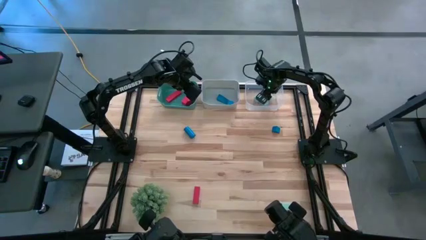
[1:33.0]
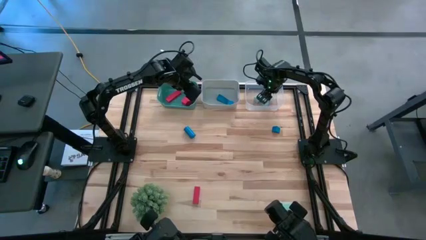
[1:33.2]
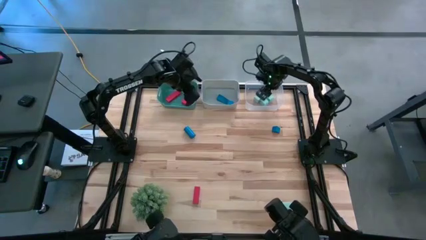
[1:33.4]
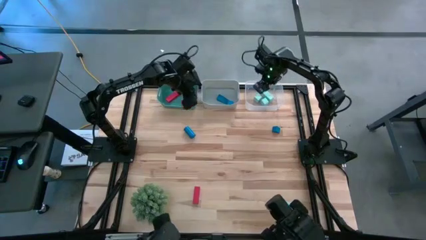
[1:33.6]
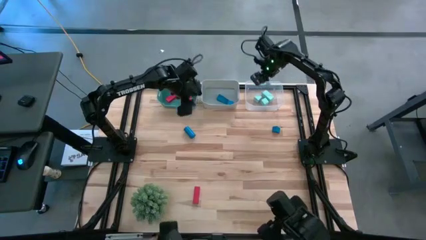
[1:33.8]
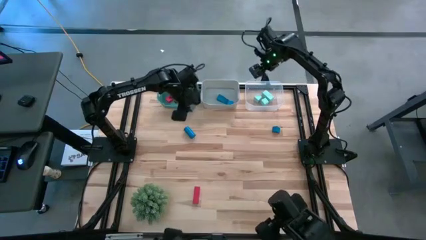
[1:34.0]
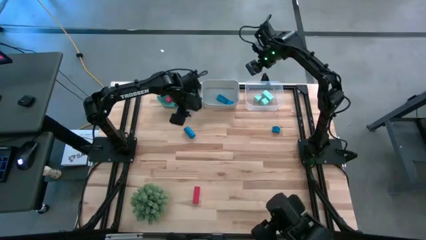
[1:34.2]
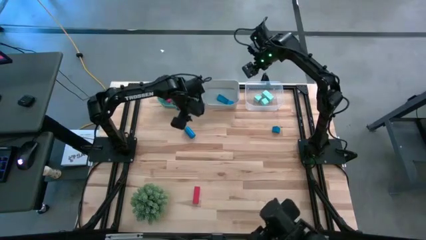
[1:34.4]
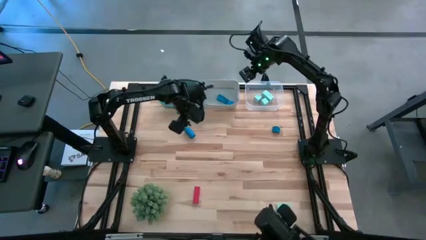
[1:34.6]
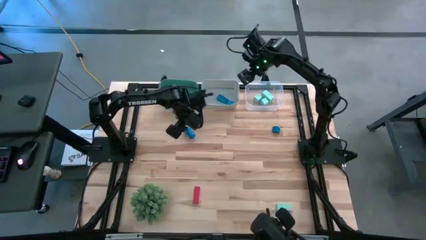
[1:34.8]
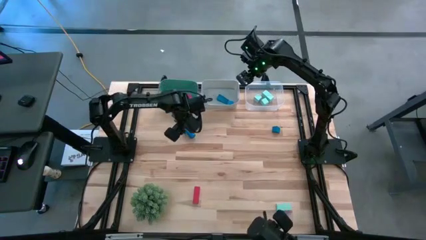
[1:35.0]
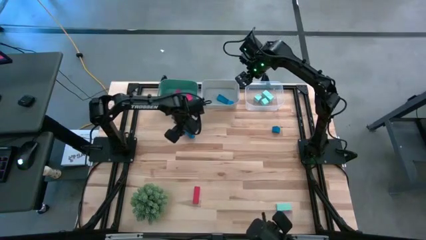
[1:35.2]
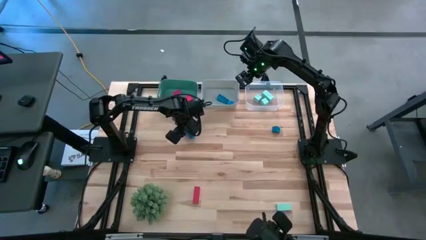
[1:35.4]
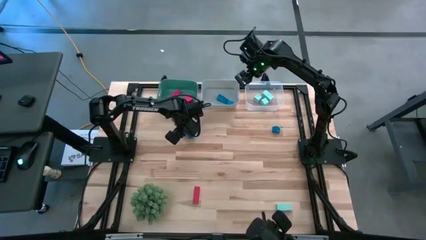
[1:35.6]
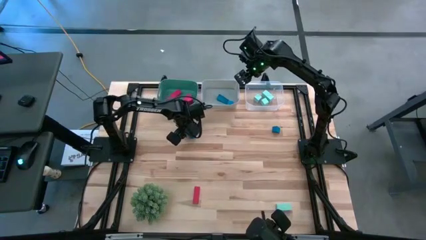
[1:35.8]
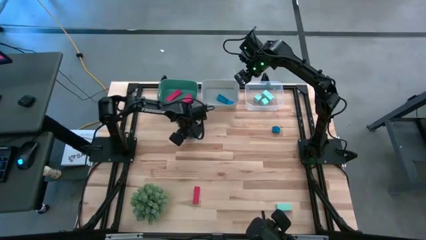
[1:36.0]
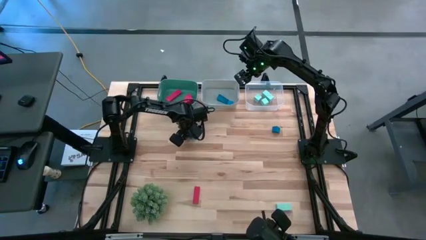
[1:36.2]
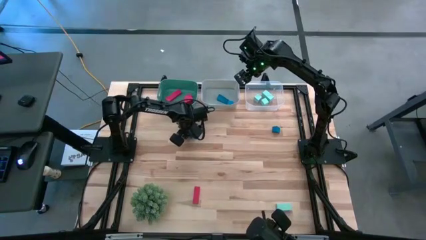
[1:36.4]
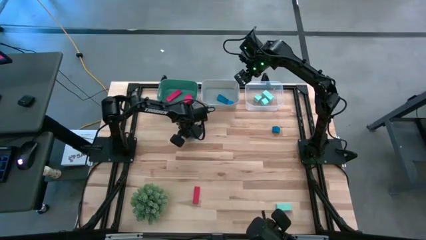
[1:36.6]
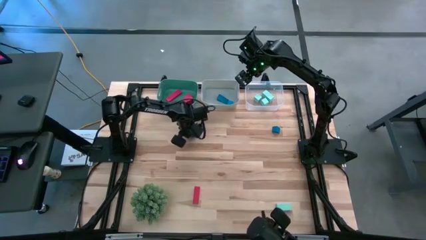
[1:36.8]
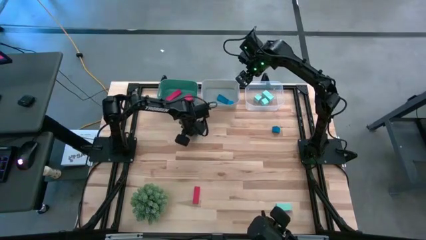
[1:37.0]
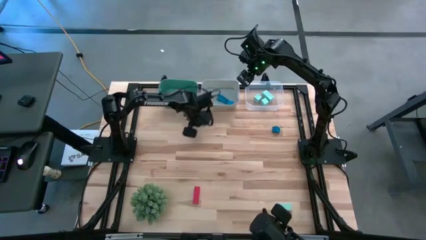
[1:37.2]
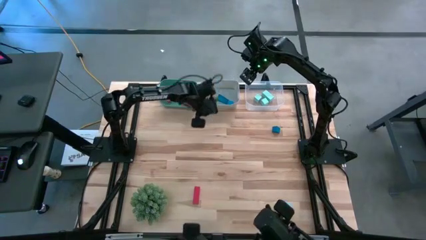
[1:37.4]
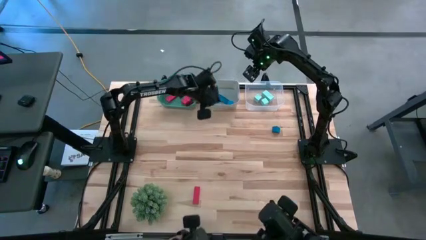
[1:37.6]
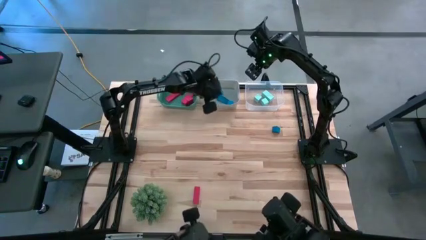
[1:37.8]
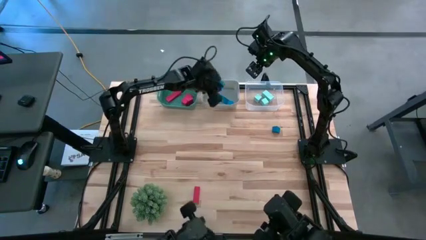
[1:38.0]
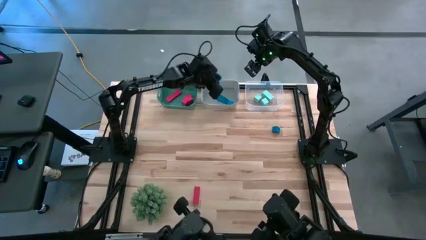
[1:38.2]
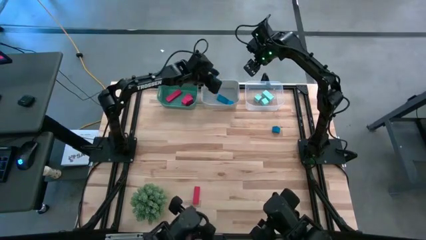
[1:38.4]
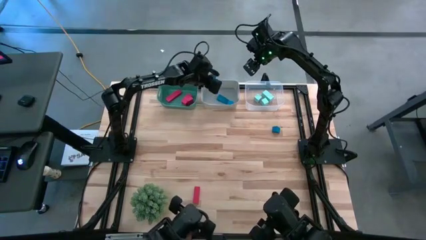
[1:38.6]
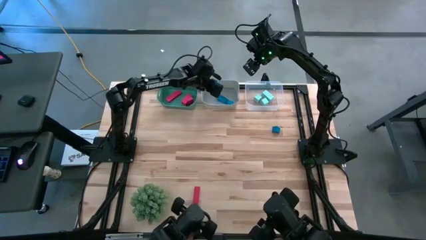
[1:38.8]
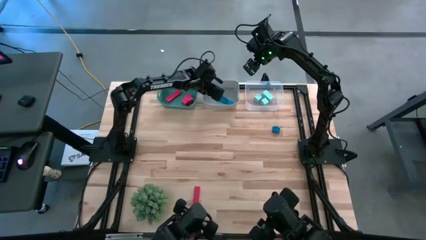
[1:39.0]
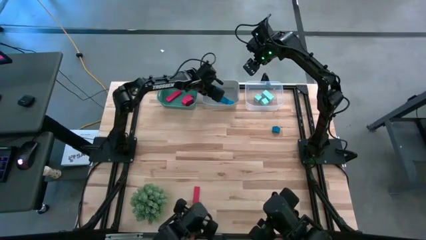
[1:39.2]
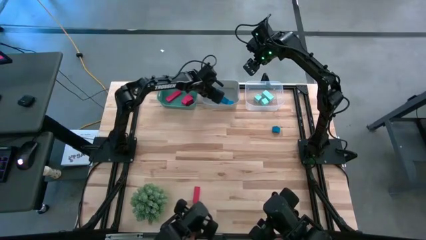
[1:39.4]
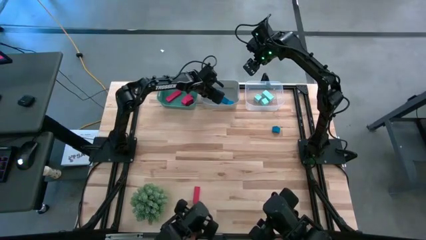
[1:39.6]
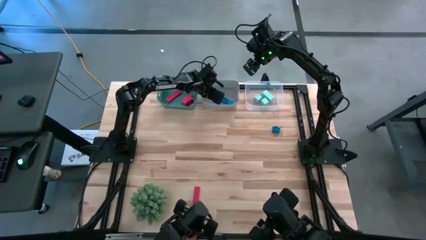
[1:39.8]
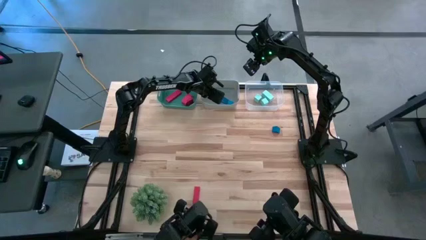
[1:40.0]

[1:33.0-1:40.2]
Task: Sort & place blocks by color
Put the blue block into the gray bin

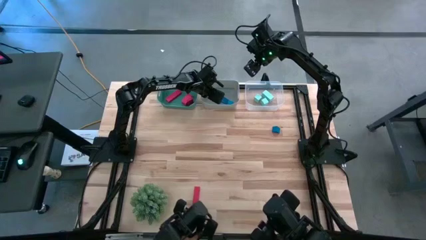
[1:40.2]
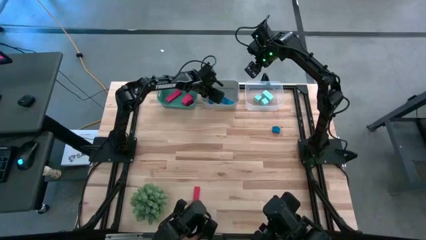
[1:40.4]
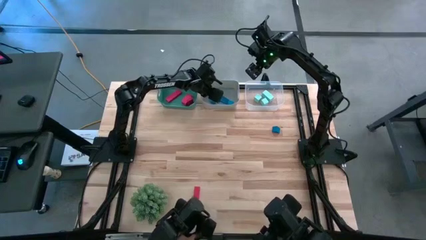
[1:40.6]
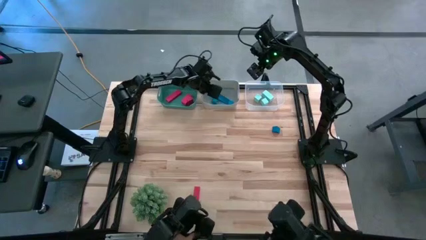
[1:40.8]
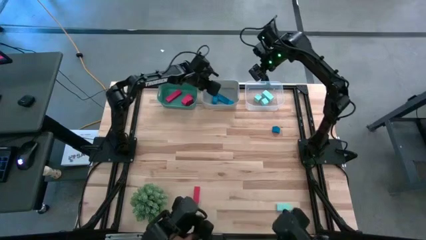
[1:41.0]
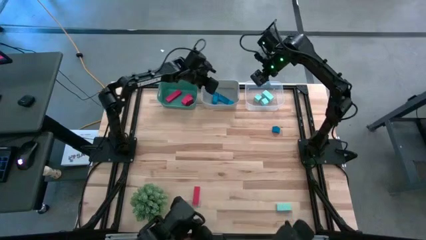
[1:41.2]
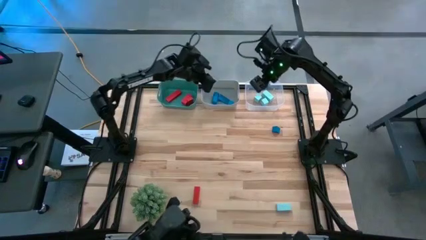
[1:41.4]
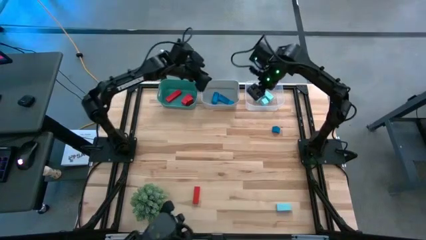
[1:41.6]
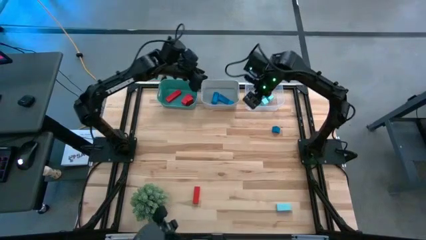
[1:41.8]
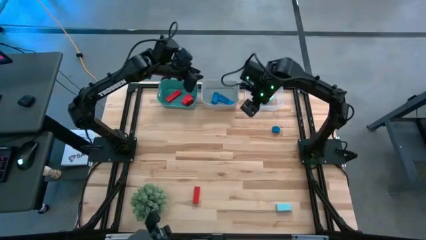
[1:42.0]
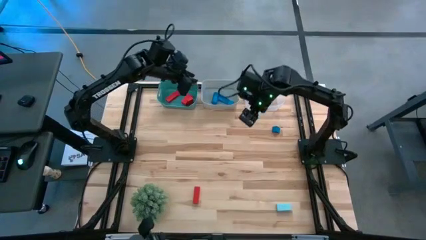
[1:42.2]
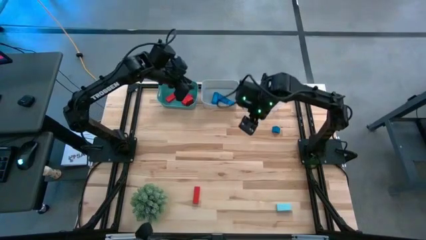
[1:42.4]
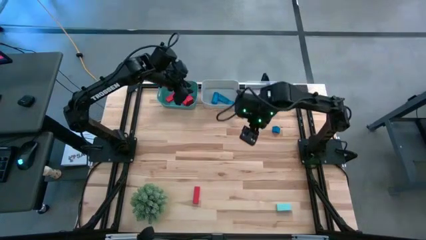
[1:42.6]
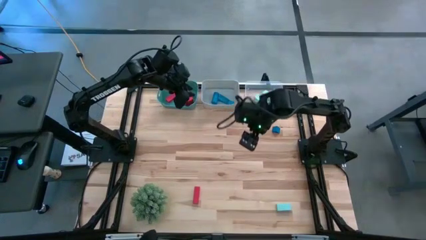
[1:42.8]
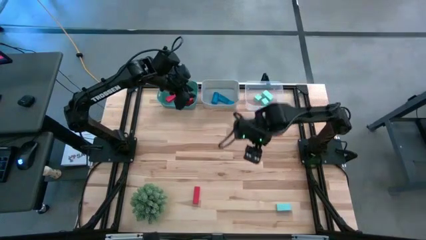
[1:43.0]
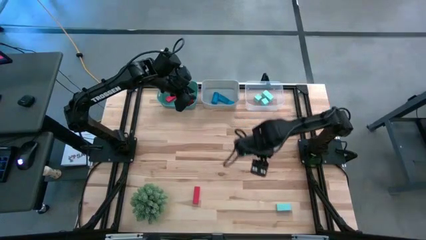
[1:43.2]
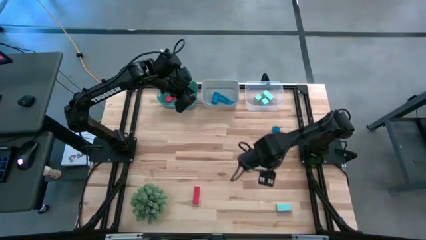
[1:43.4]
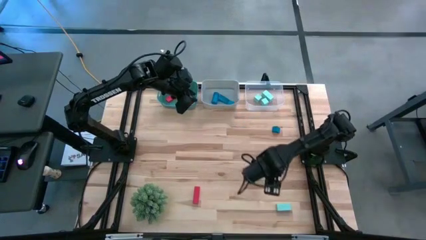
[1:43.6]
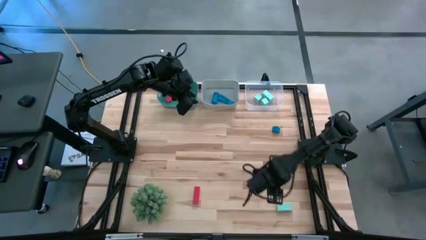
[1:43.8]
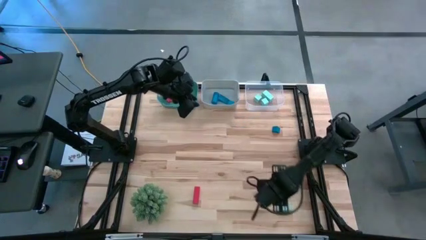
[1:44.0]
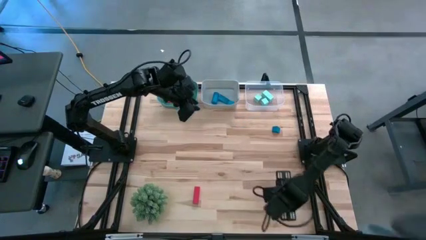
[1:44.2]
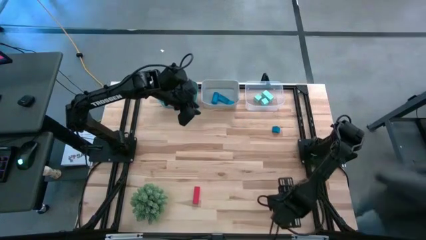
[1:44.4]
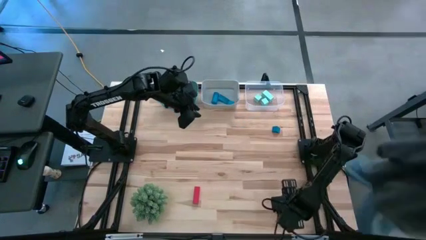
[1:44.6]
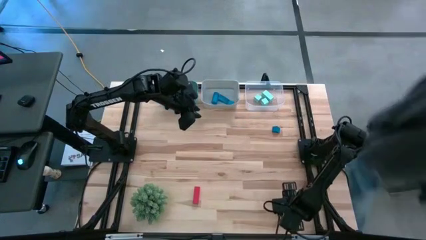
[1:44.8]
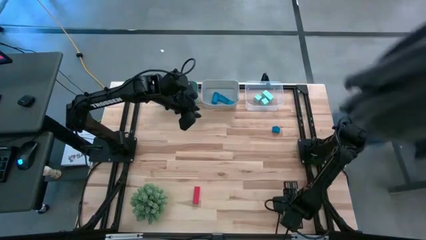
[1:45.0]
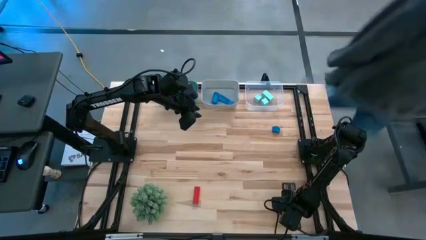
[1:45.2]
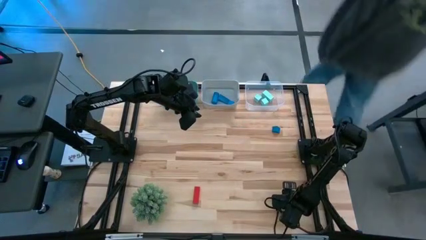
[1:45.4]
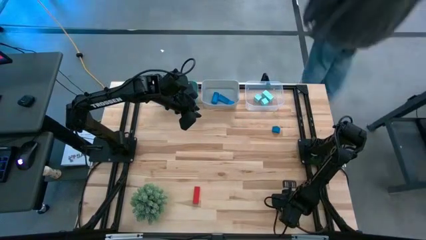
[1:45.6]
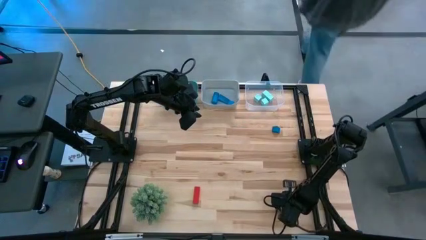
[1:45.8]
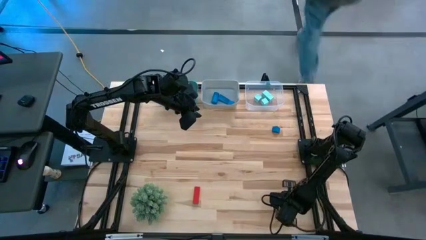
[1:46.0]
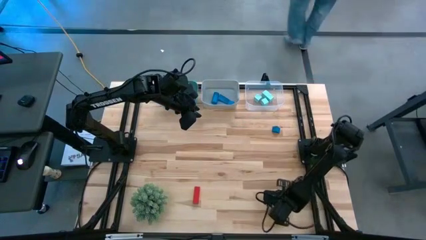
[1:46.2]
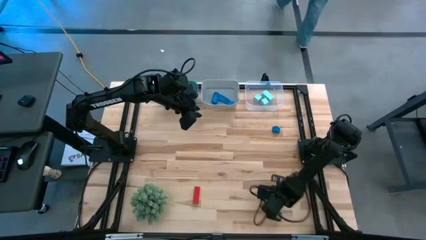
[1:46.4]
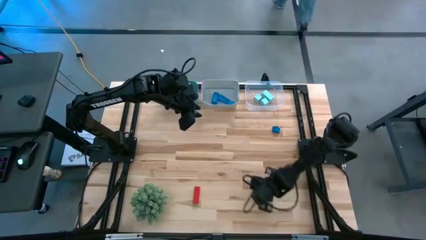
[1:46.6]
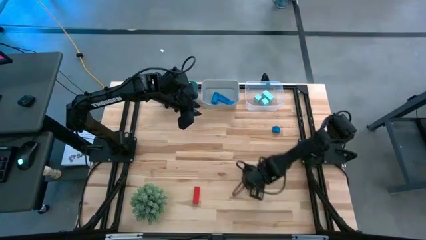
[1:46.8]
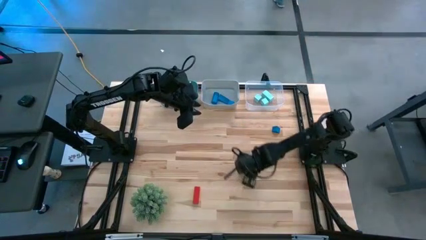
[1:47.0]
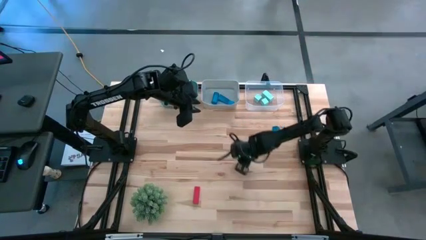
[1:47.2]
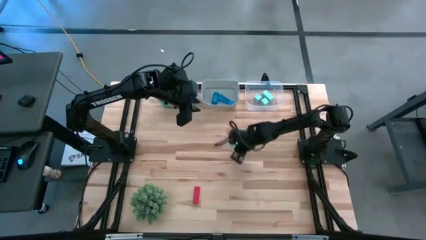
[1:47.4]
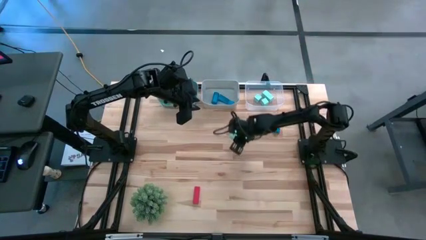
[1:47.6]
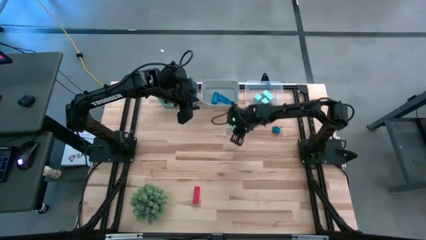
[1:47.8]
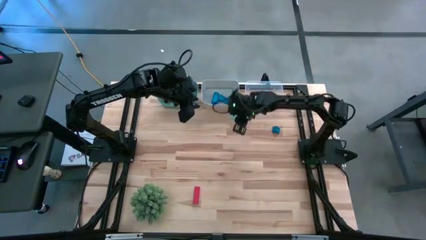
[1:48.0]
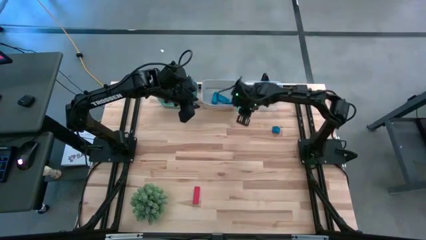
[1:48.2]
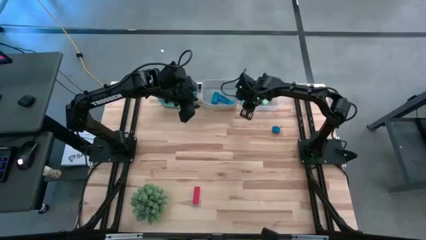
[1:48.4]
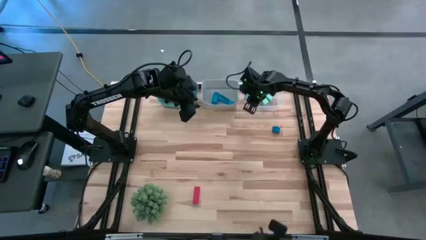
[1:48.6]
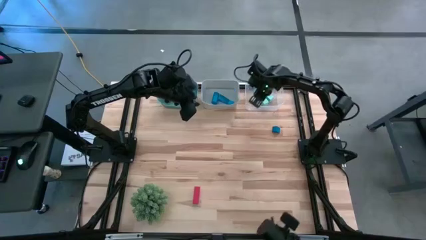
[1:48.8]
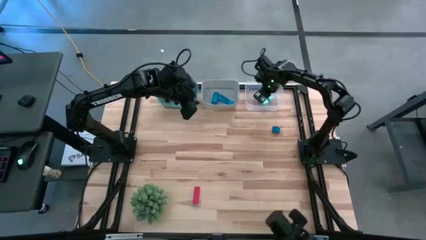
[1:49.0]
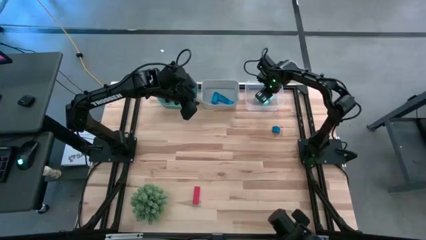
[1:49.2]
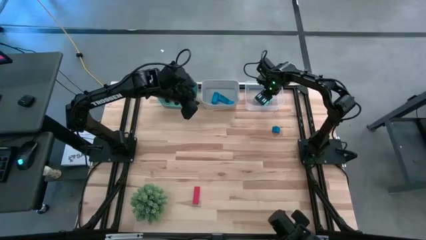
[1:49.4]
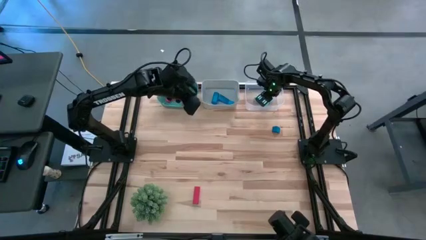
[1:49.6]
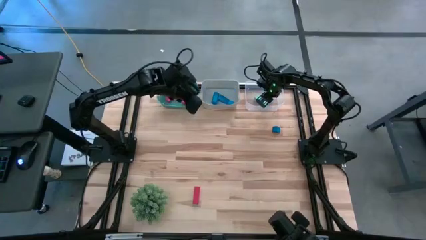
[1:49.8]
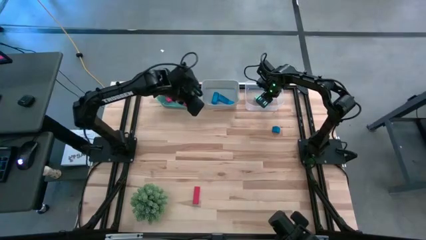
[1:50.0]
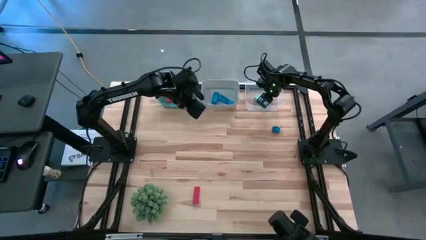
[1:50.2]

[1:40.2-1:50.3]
Put the light blue block into the transparent bin
